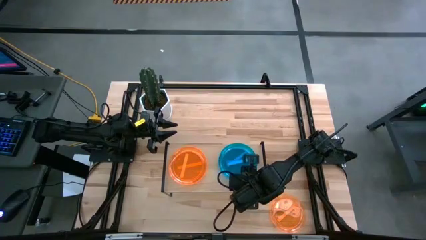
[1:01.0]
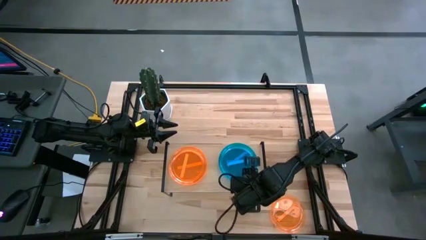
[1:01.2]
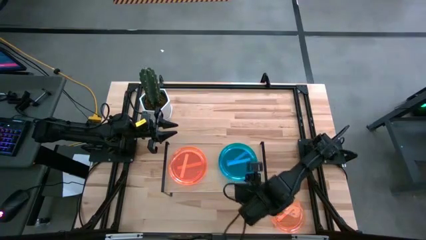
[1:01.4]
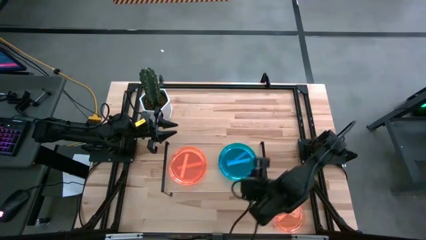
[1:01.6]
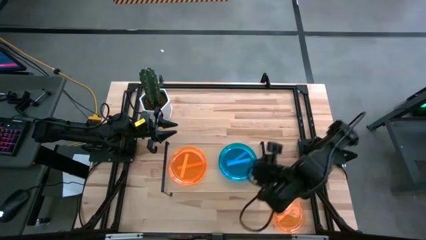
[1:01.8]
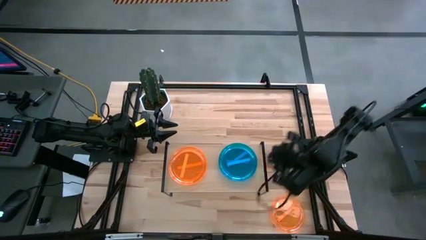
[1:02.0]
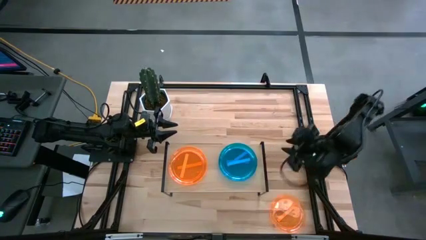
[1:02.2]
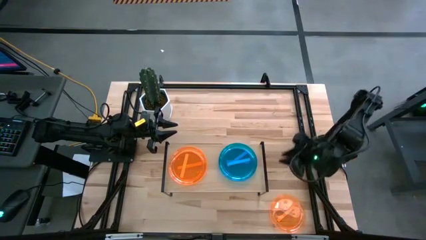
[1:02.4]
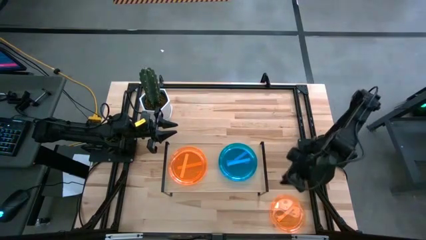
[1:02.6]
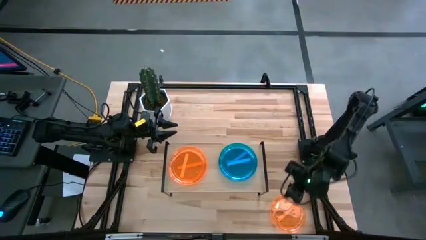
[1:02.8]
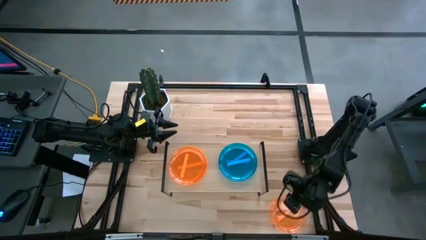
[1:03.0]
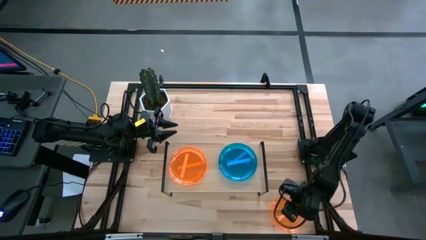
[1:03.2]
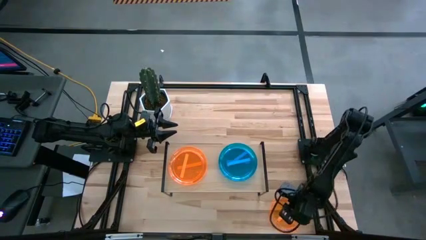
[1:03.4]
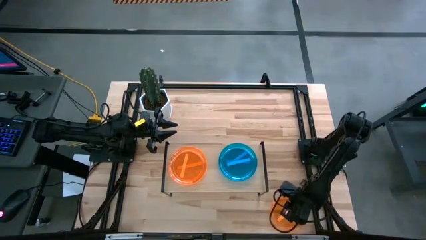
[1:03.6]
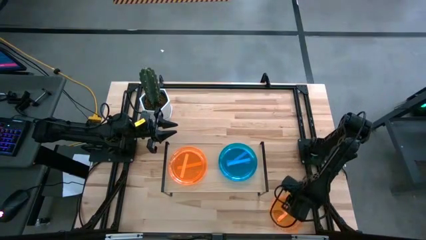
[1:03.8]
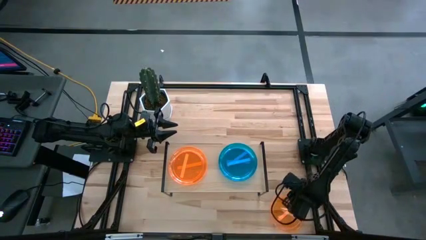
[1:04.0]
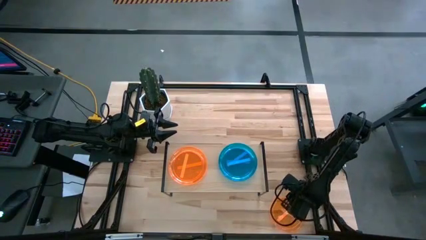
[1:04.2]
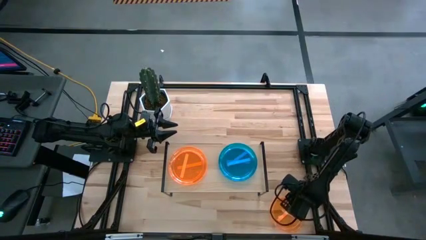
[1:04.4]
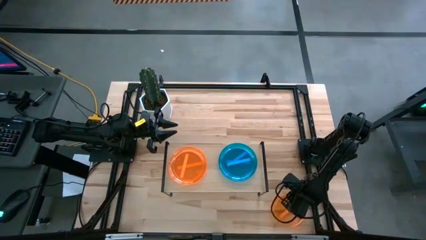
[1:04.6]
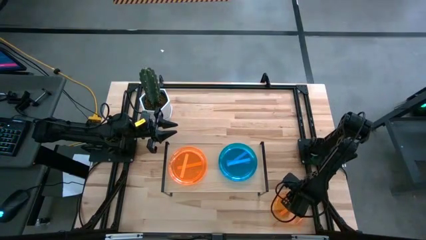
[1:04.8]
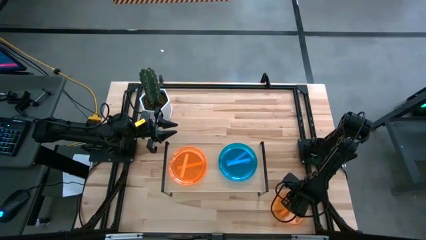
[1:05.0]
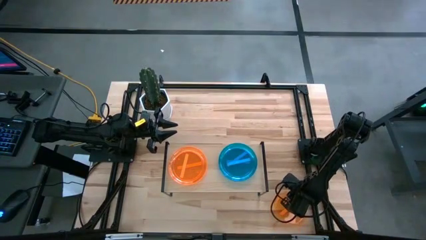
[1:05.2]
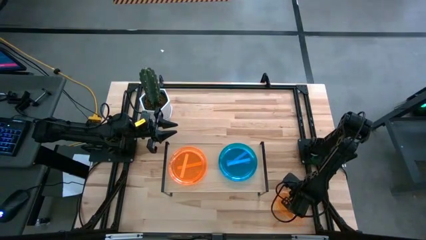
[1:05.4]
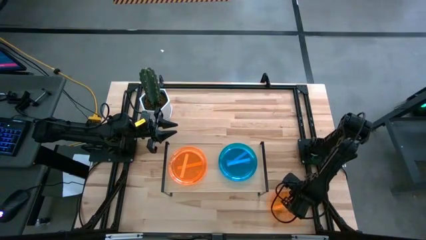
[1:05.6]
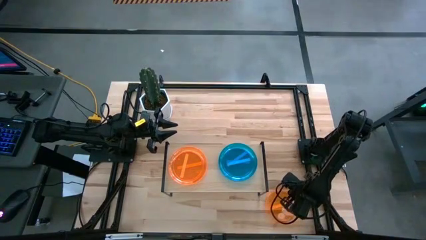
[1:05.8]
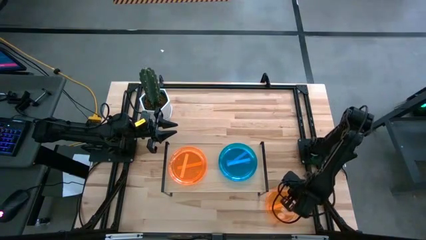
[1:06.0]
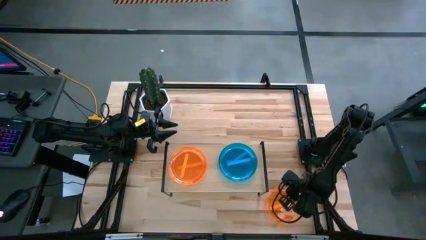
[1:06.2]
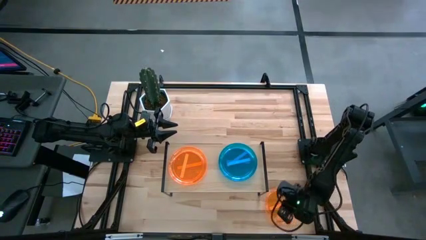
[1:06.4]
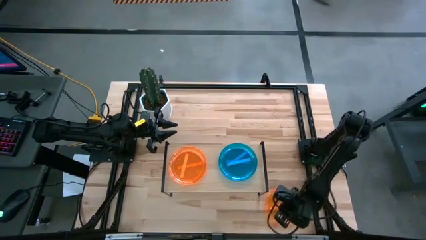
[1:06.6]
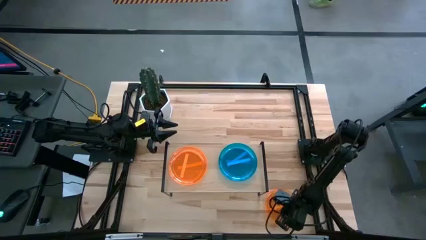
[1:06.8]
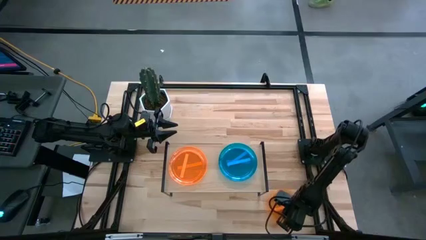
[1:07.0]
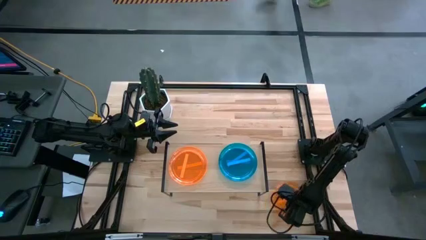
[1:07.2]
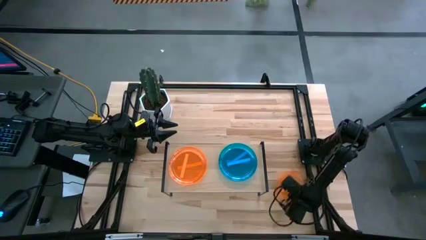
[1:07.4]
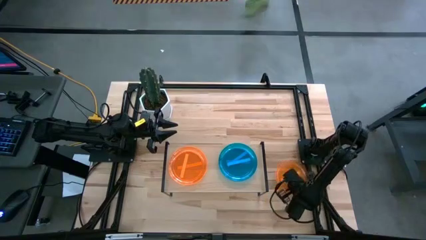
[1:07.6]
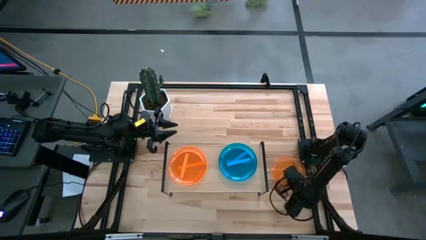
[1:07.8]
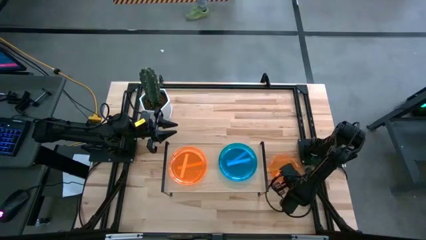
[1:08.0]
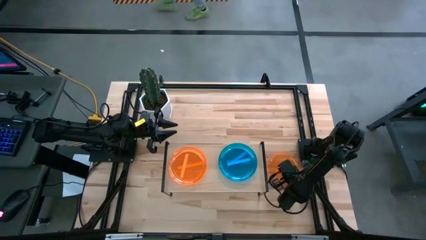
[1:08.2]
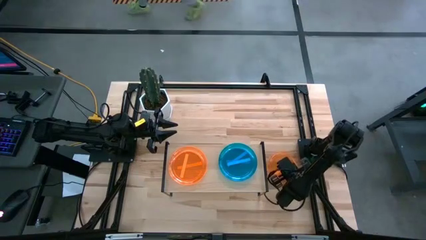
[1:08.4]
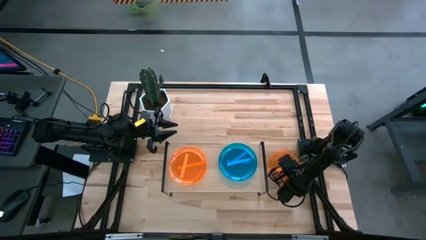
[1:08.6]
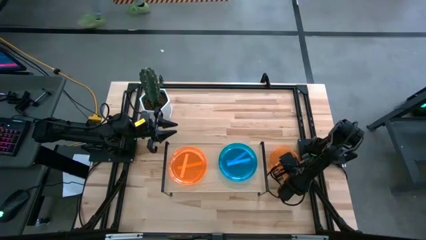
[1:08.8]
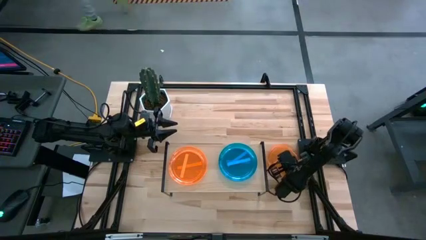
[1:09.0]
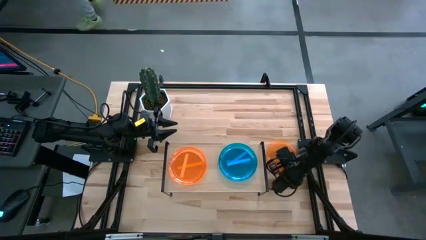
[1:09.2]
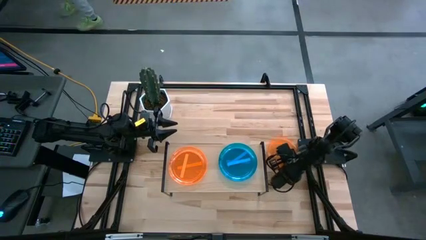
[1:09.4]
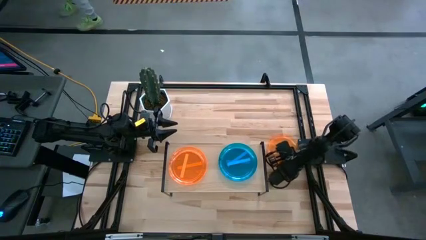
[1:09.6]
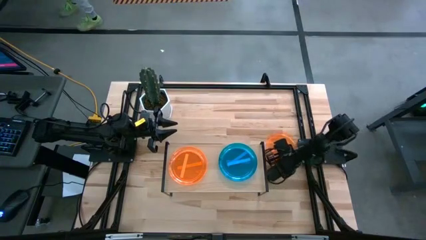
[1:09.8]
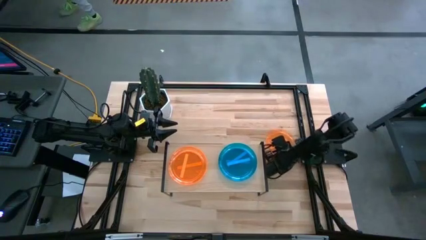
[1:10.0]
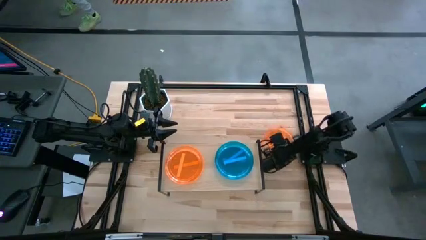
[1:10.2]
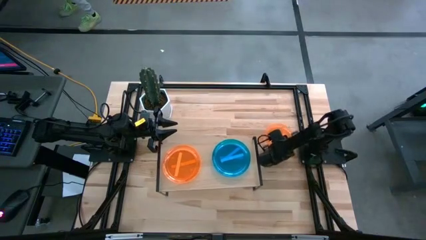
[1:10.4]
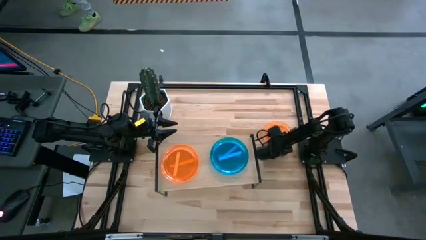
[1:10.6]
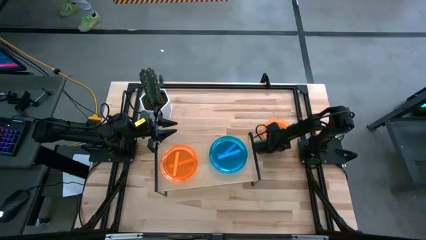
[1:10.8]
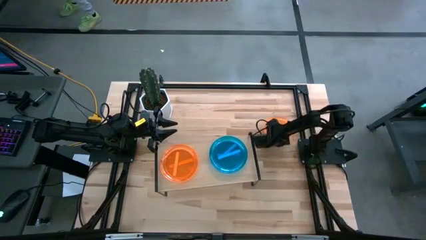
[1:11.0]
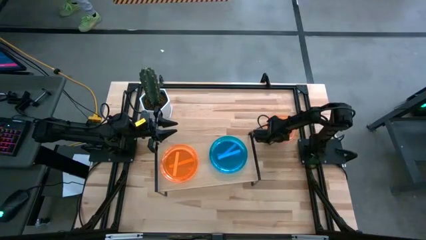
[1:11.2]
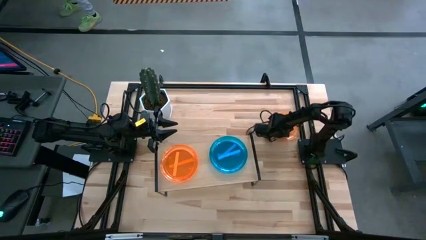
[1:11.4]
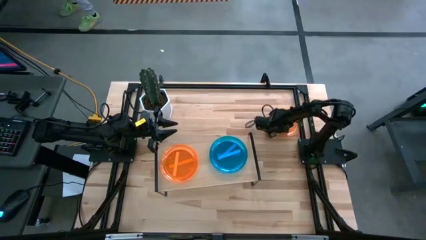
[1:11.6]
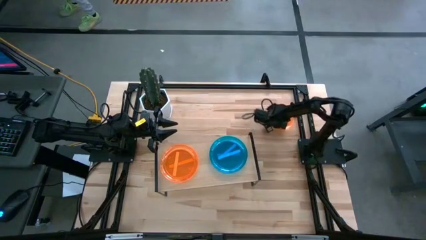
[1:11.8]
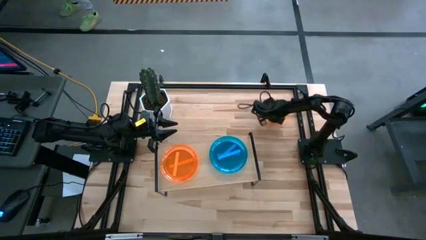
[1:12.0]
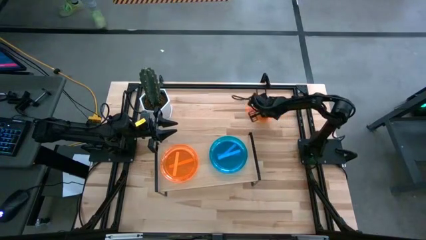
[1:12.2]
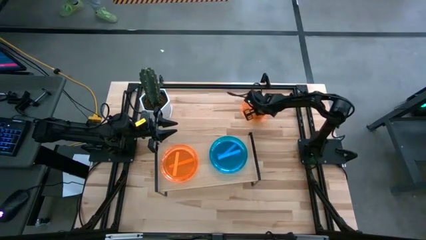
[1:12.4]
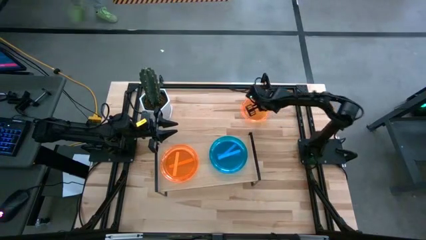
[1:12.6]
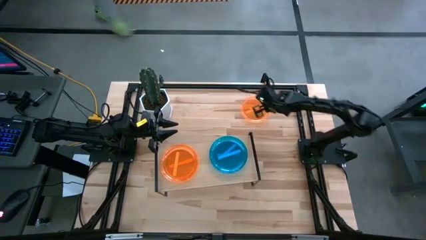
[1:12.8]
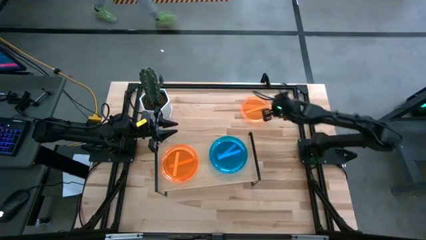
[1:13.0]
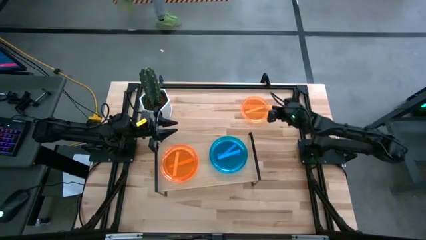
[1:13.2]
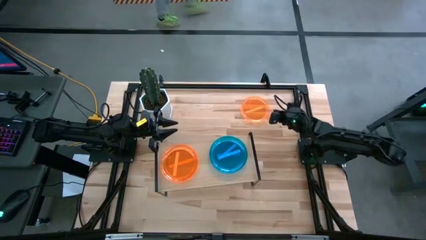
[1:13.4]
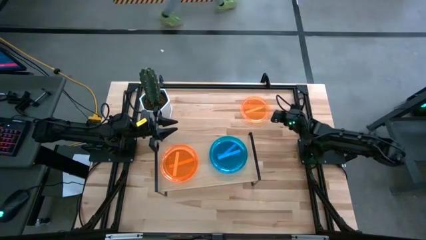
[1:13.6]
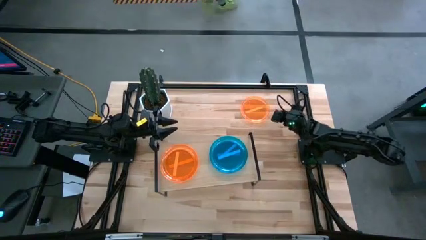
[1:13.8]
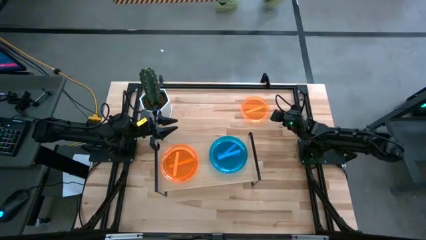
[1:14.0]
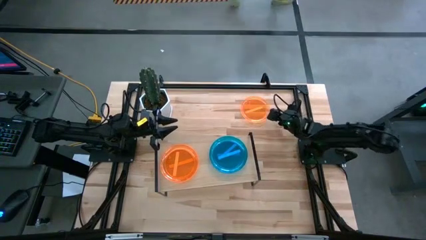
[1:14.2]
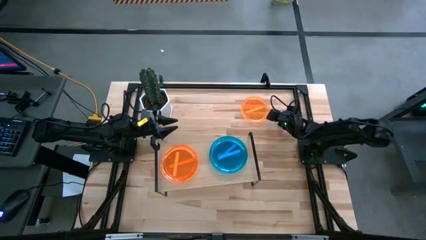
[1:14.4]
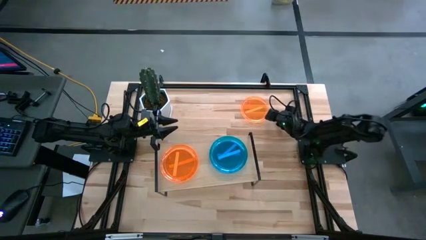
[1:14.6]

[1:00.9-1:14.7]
Task: Place and stack plates onto a shelf
Stack the orange transparent plate on top of the orange transparent plate
